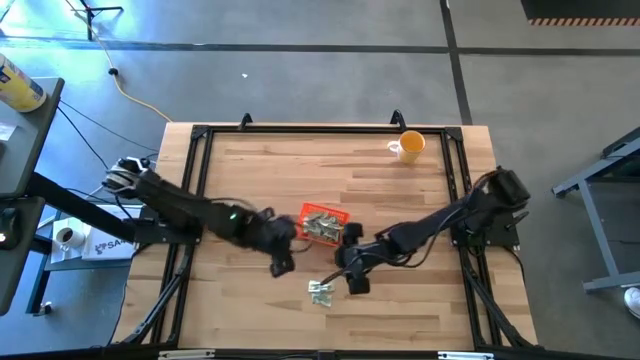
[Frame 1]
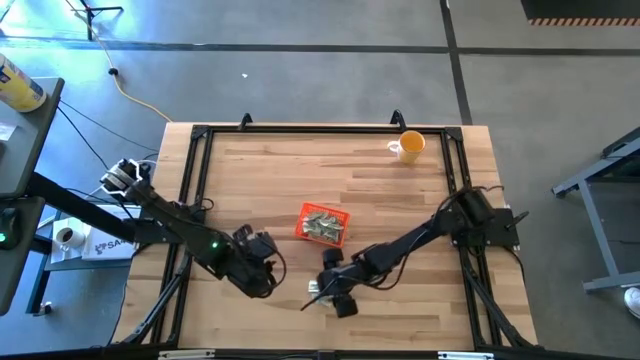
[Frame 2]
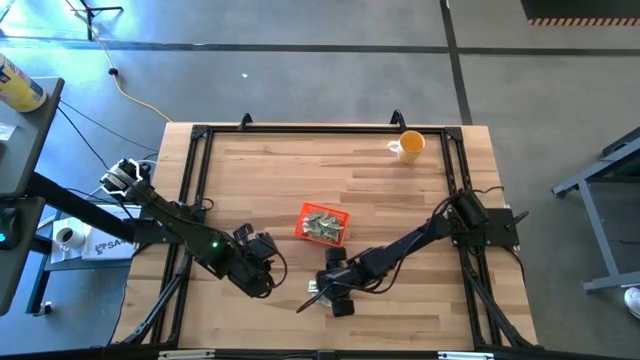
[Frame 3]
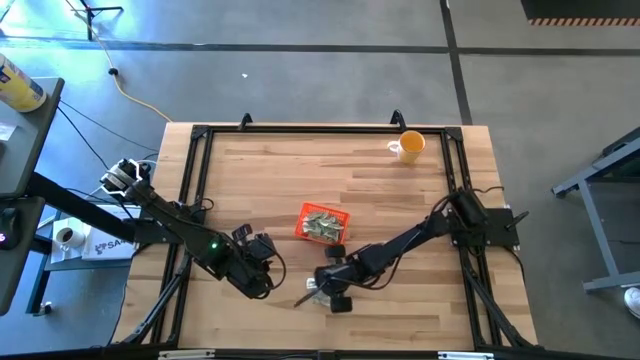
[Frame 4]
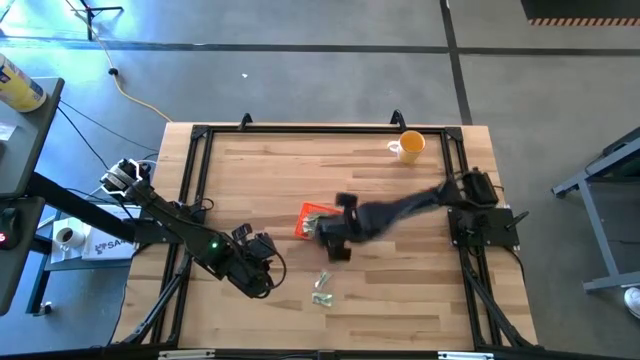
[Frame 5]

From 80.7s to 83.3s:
Task: Pick and place Stevia / Truvia into bins
Put the stevia packet into the orange bin

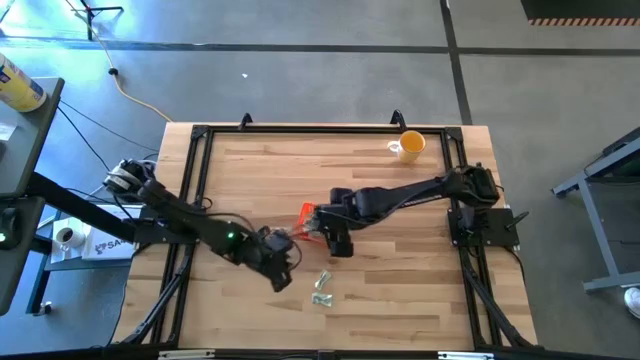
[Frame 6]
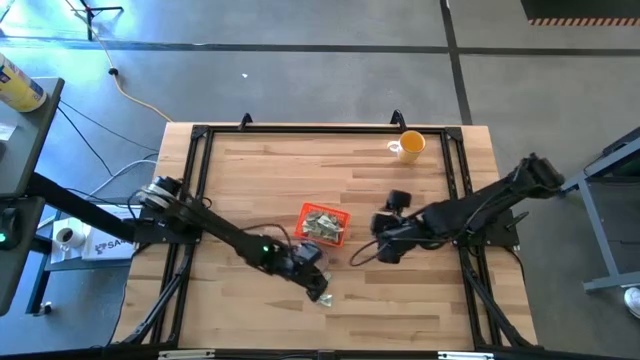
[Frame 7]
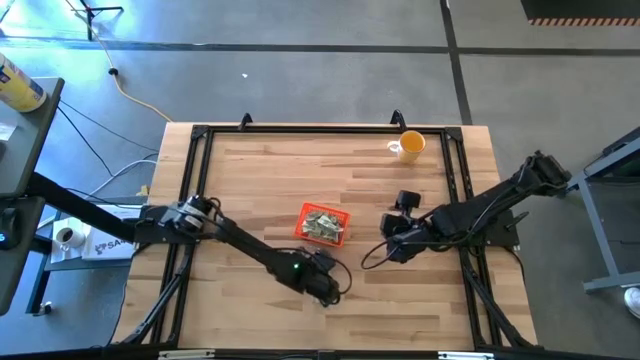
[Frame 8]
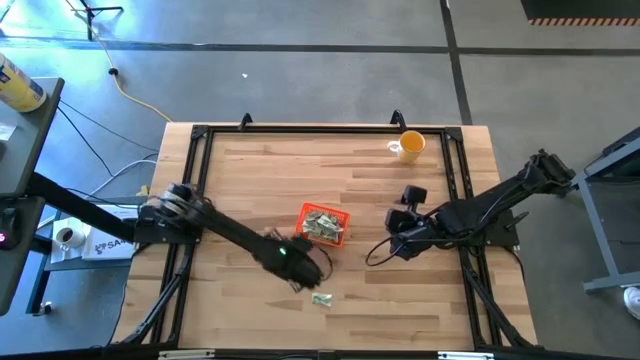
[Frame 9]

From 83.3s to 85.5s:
Put the stevia packet into the orange bin

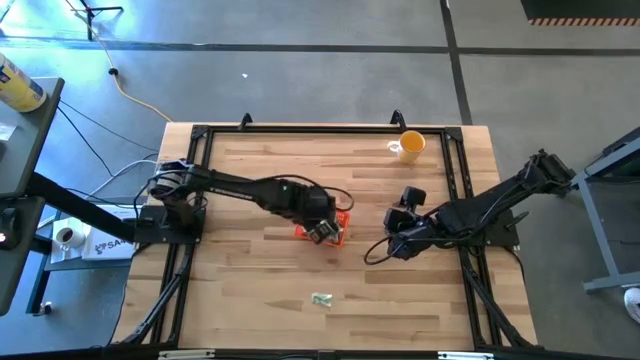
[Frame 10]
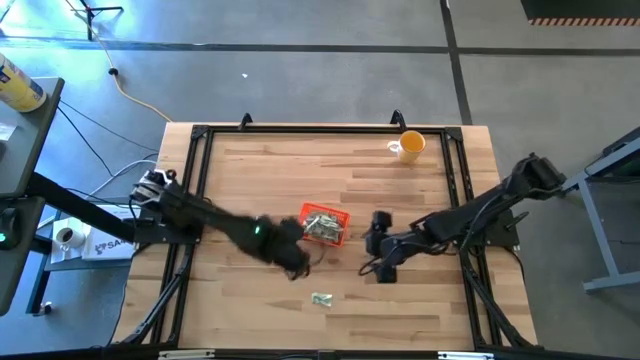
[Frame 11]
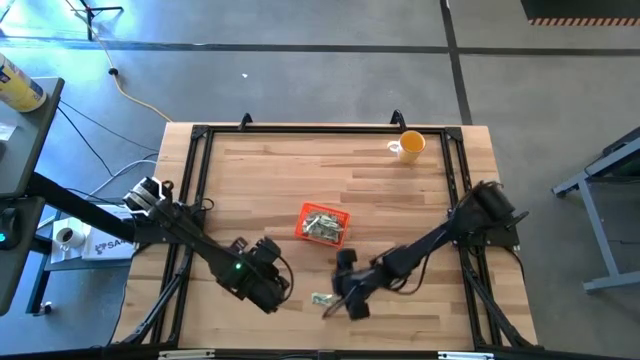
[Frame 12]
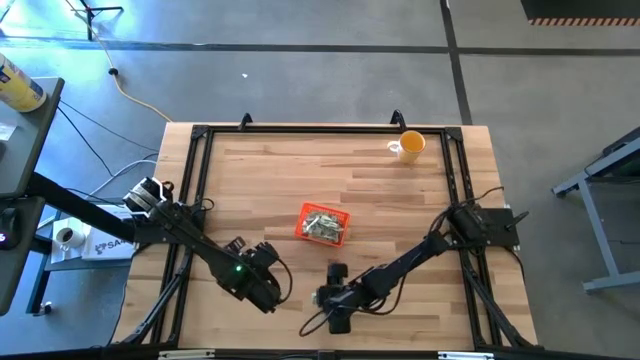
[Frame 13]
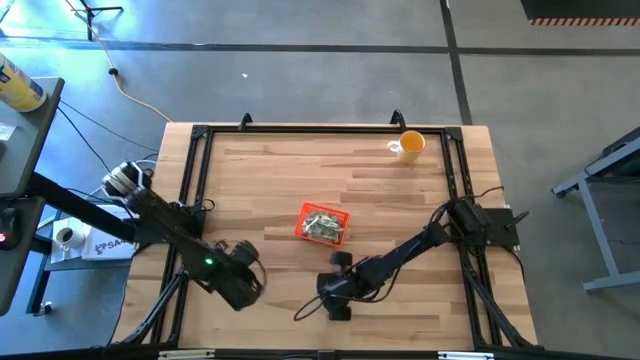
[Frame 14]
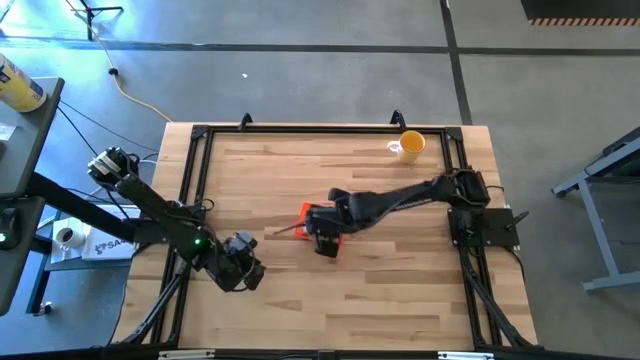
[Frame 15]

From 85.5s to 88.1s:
Put the stevia packet into the orange bin

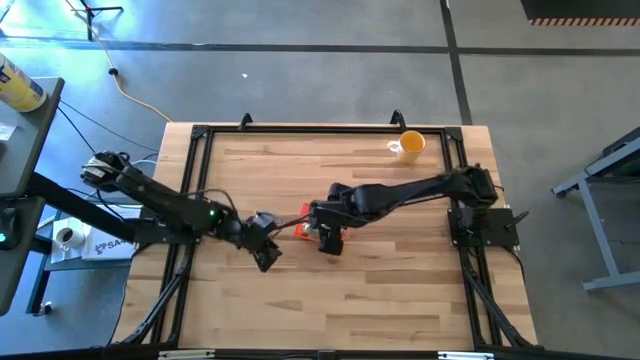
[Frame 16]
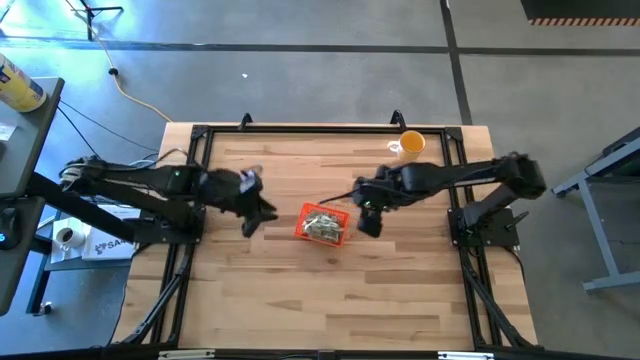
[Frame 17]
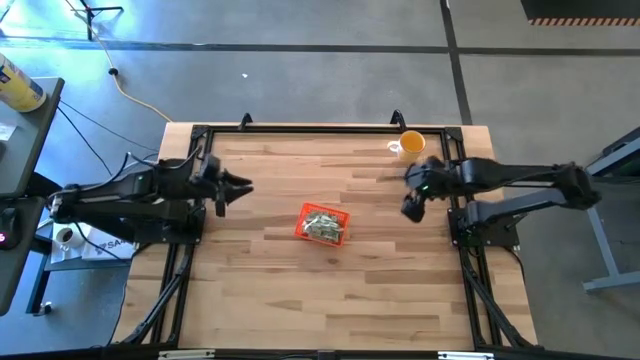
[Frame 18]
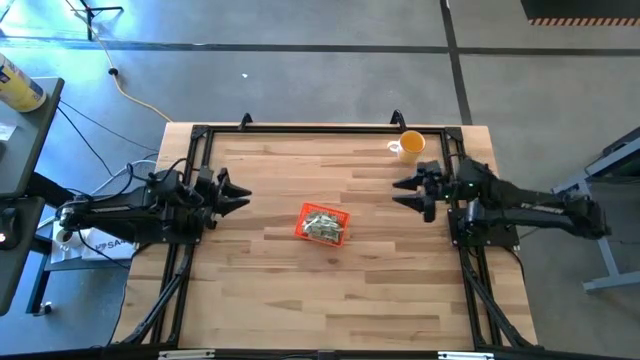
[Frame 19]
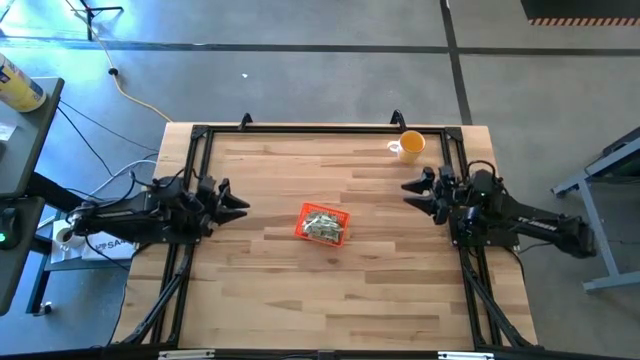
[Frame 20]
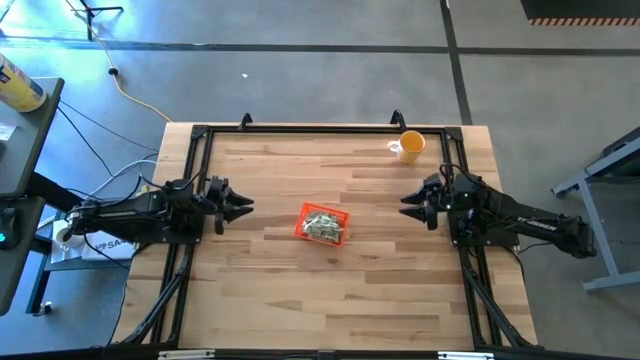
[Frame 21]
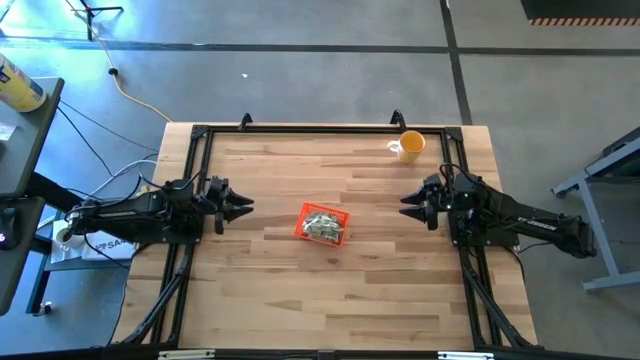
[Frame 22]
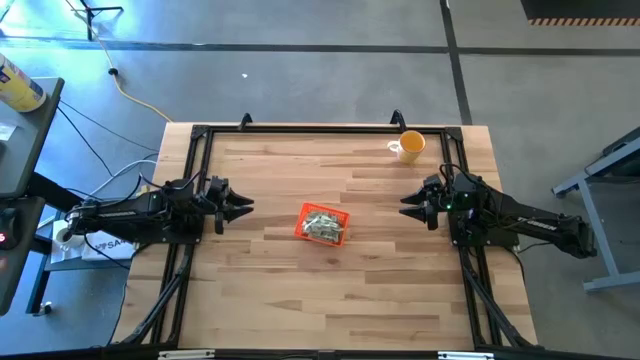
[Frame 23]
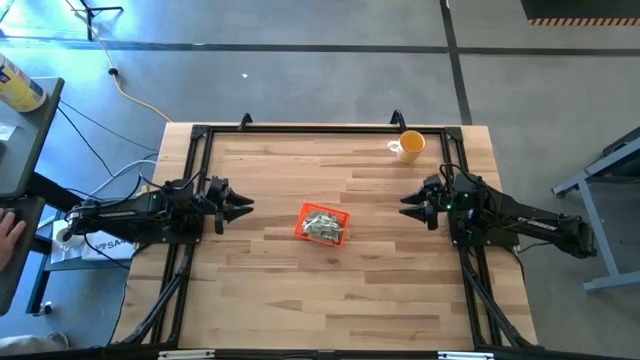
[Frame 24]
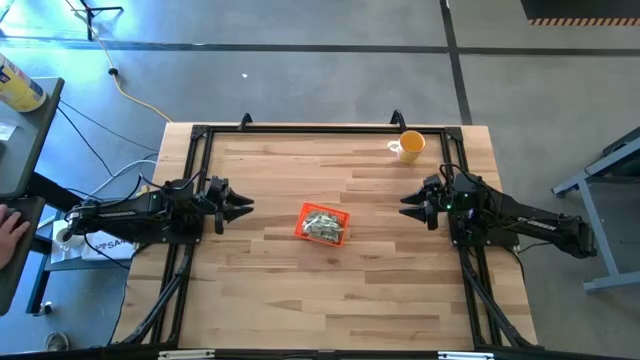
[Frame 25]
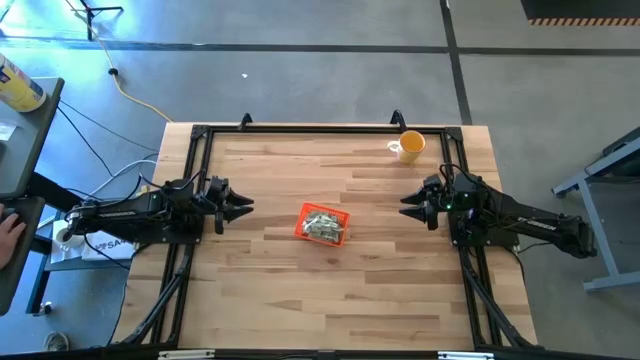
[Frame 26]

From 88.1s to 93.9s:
Return to Home Position

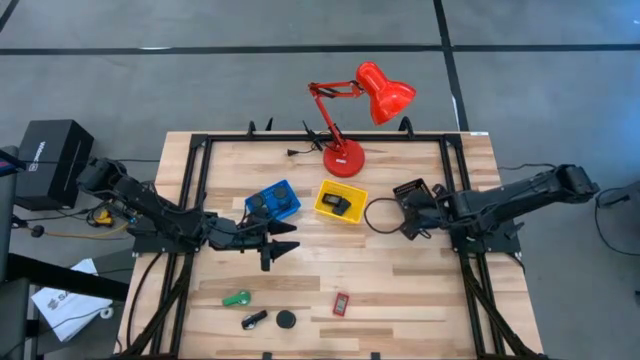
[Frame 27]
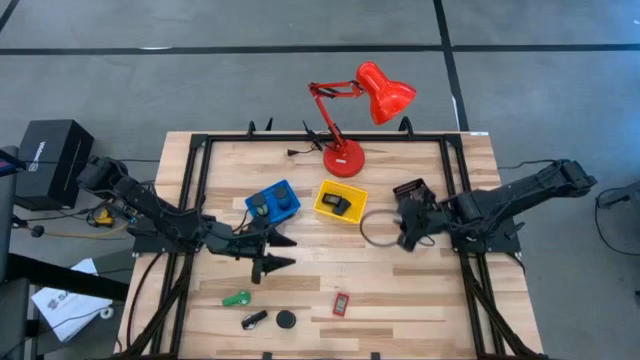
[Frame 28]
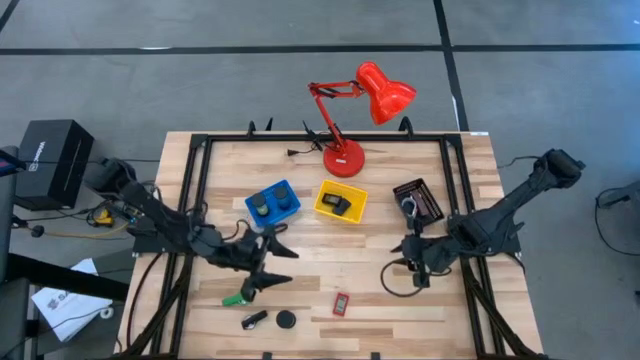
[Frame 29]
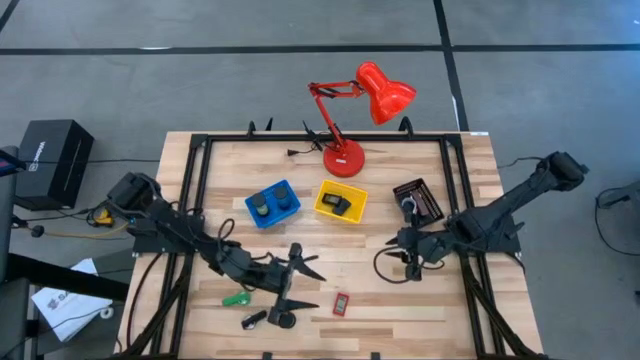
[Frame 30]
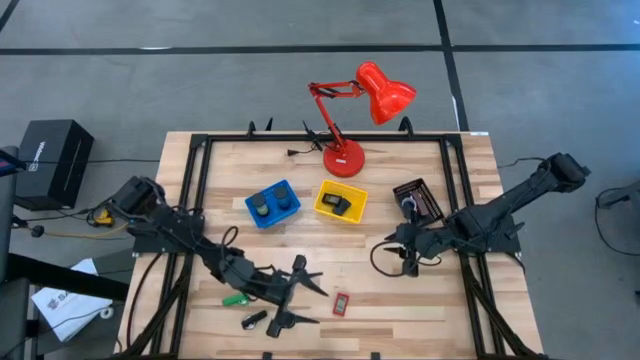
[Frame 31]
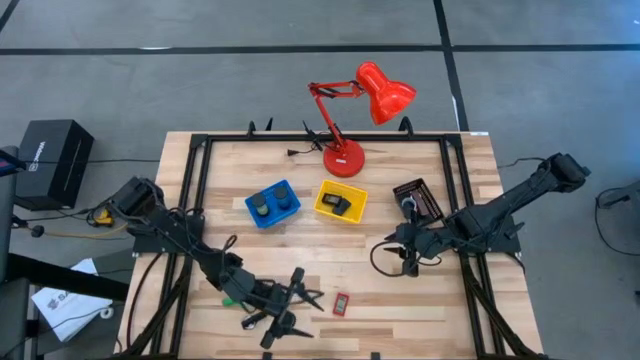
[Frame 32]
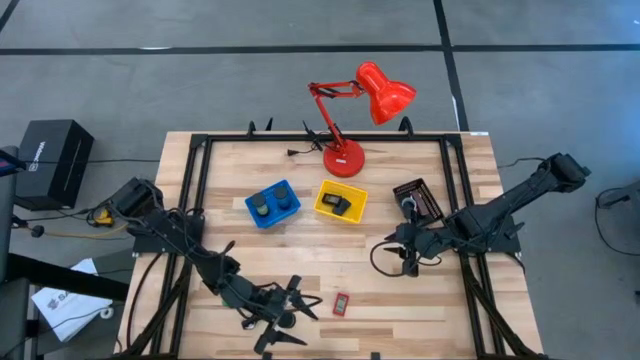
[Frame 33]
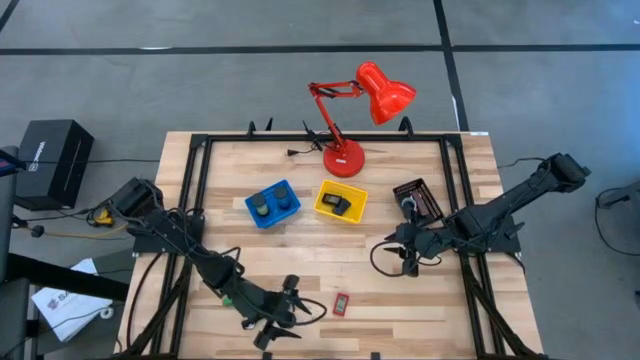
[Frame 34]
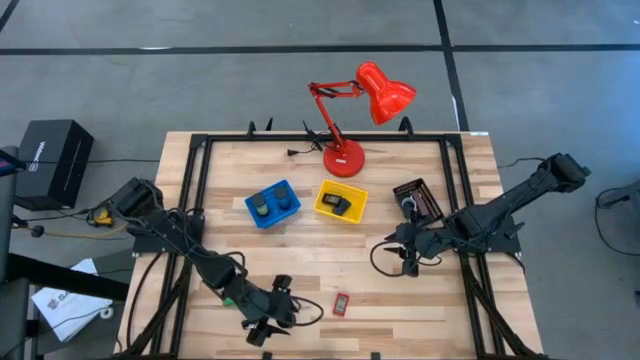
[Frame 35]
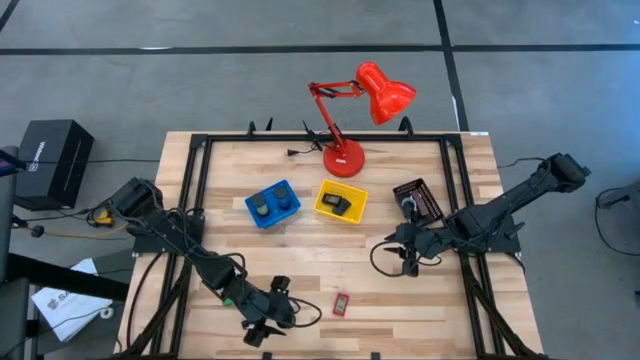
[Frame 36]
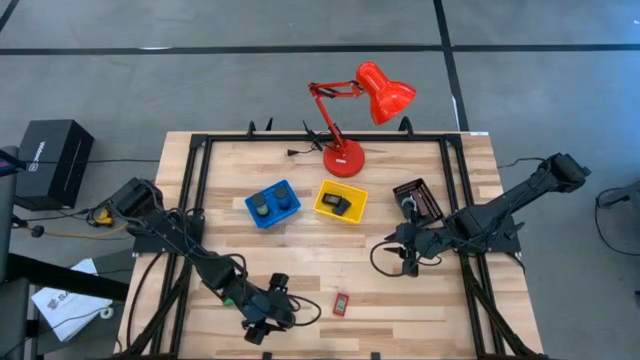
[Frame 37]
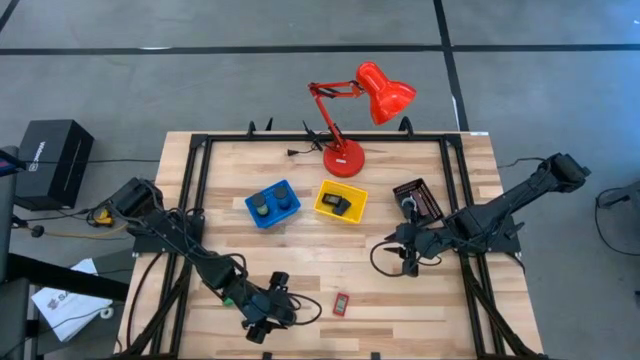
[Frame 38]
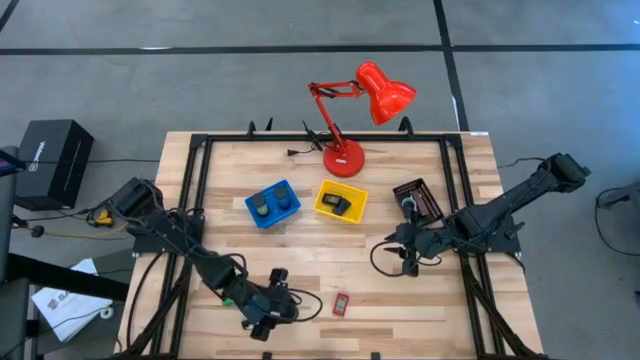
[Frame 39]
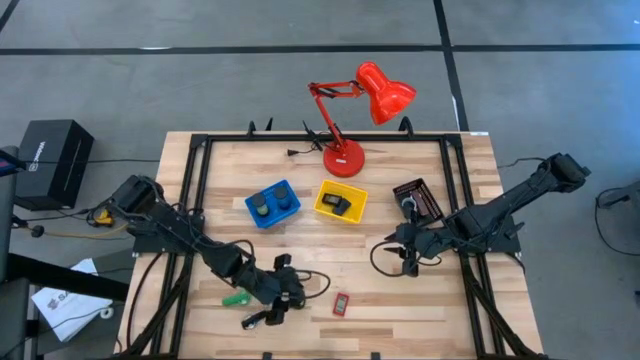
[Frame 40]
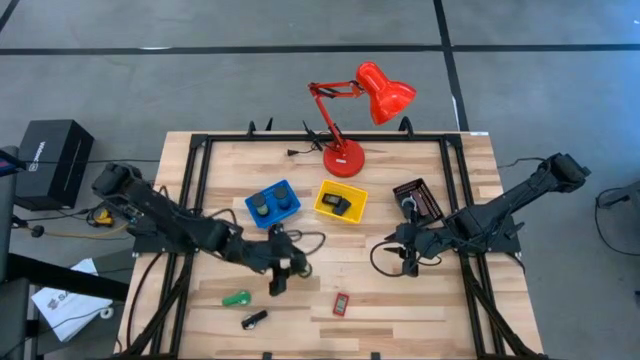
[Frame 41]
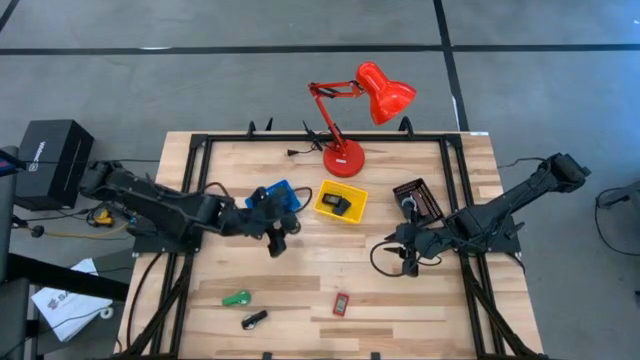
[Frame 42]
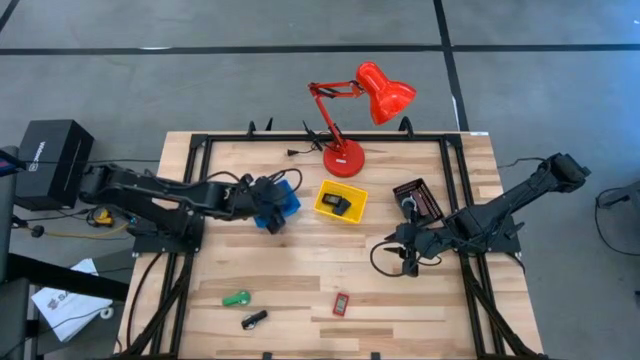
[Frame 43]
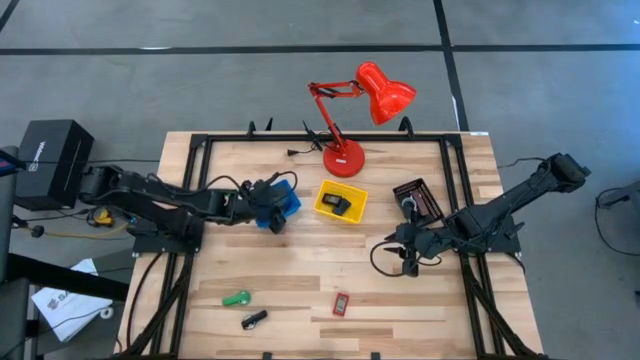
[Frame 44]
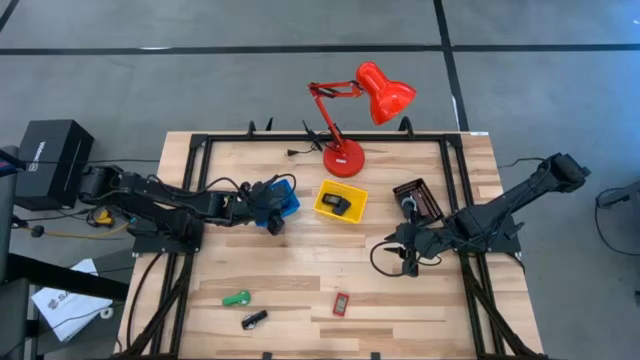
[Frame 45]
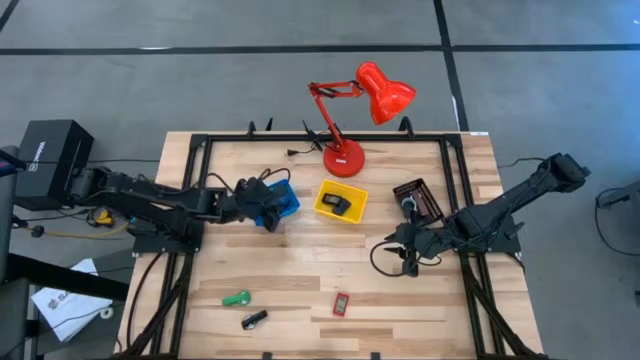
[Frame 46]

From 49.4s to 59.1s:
Task: Pick & Place Office items
Put the yellow hourglass into the blue bin
